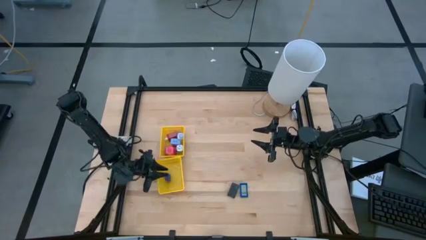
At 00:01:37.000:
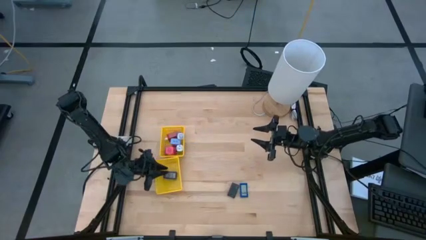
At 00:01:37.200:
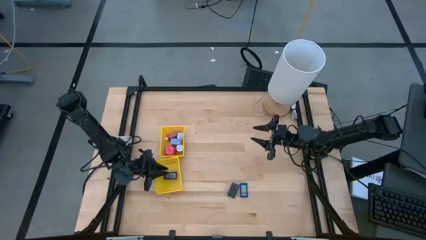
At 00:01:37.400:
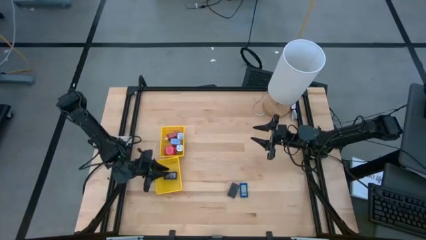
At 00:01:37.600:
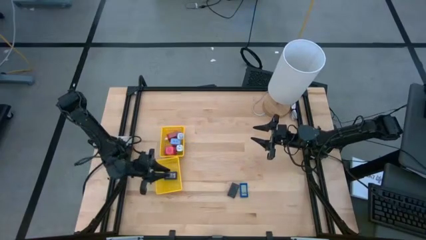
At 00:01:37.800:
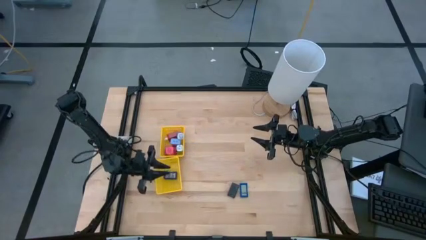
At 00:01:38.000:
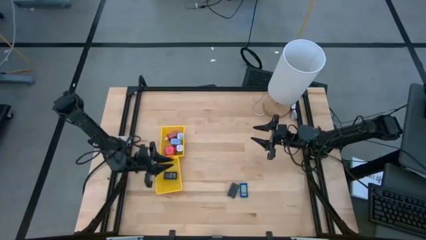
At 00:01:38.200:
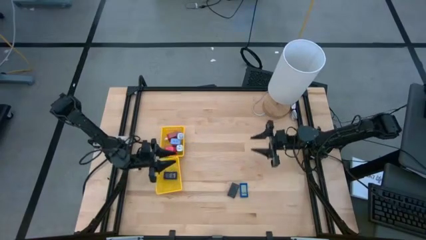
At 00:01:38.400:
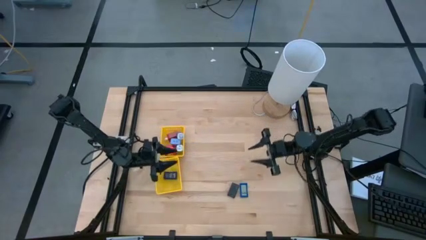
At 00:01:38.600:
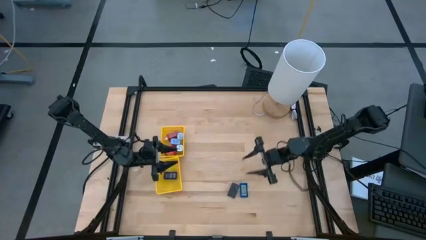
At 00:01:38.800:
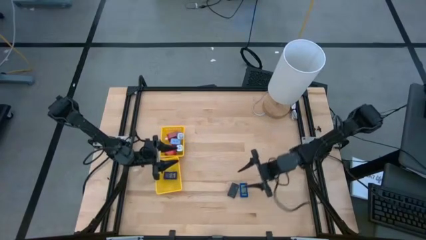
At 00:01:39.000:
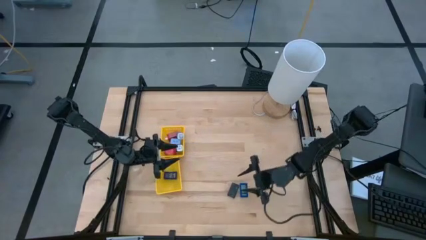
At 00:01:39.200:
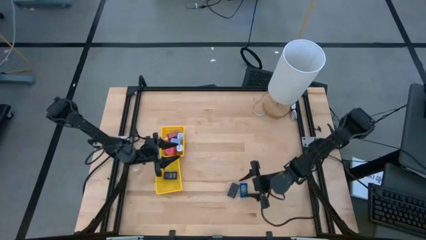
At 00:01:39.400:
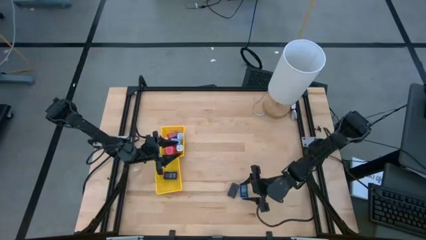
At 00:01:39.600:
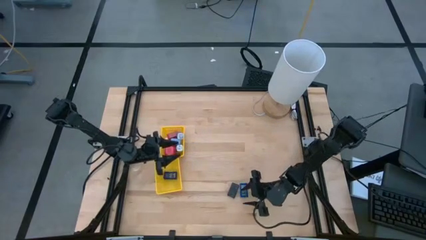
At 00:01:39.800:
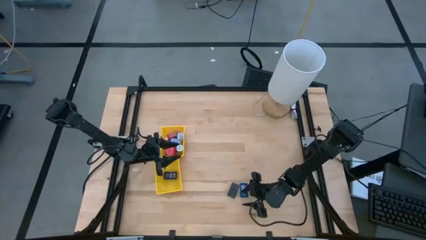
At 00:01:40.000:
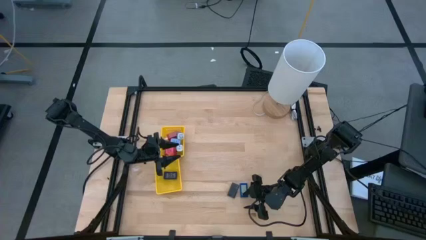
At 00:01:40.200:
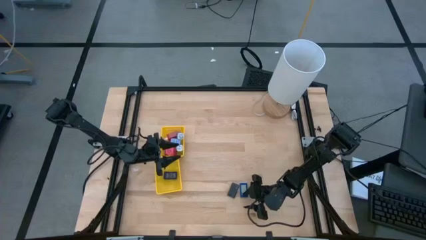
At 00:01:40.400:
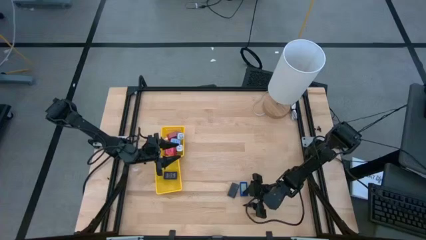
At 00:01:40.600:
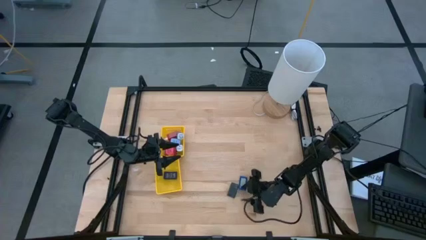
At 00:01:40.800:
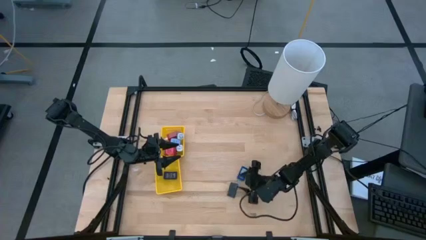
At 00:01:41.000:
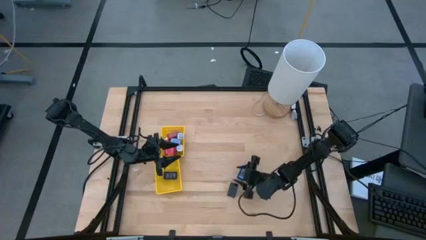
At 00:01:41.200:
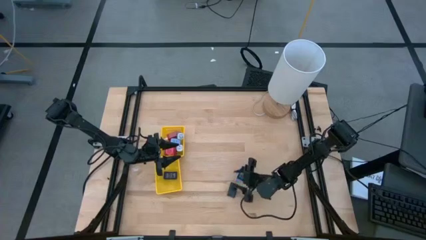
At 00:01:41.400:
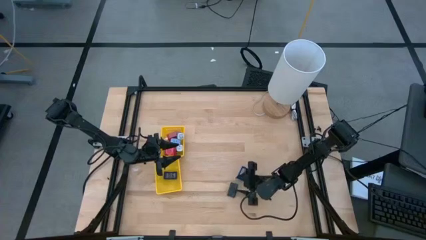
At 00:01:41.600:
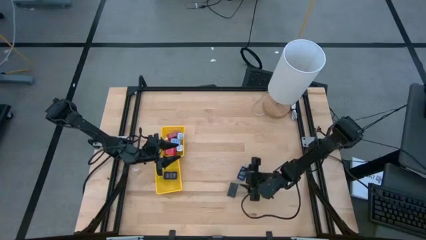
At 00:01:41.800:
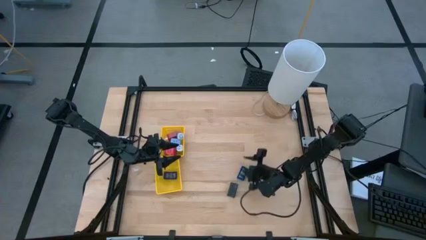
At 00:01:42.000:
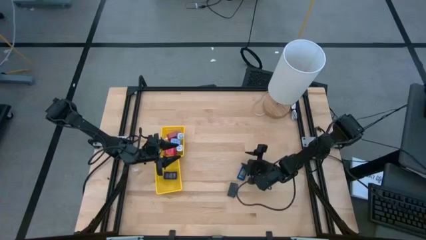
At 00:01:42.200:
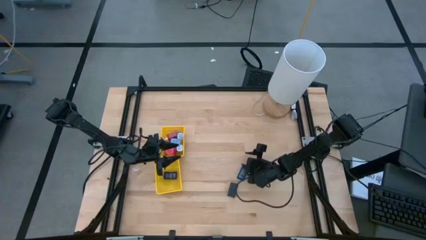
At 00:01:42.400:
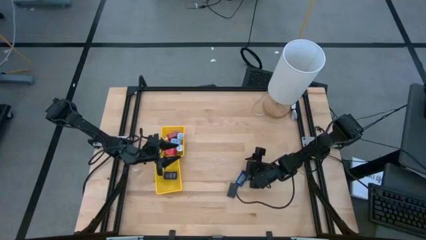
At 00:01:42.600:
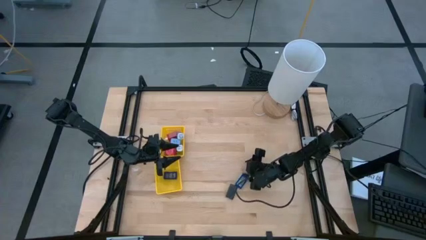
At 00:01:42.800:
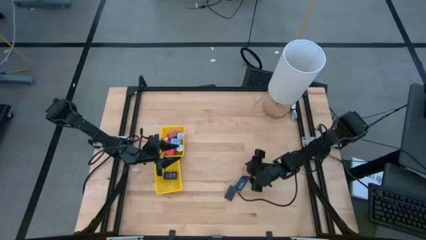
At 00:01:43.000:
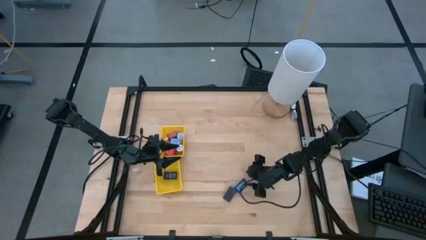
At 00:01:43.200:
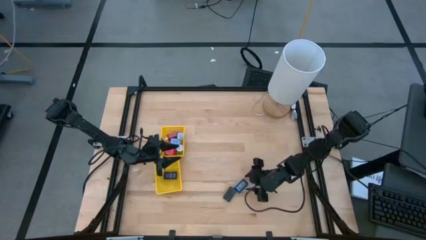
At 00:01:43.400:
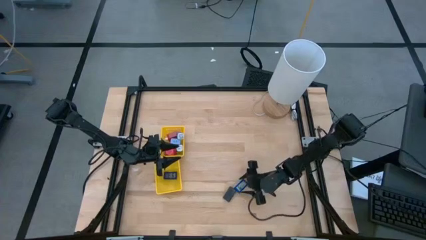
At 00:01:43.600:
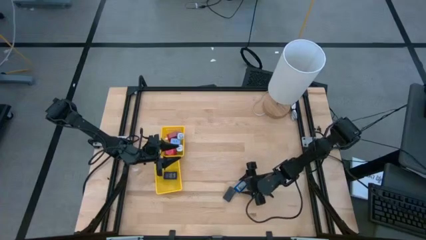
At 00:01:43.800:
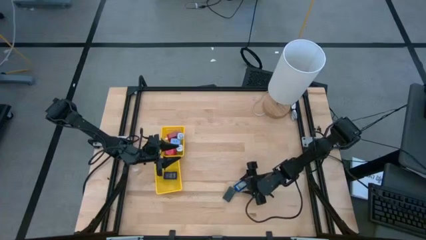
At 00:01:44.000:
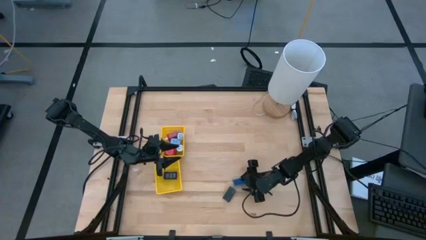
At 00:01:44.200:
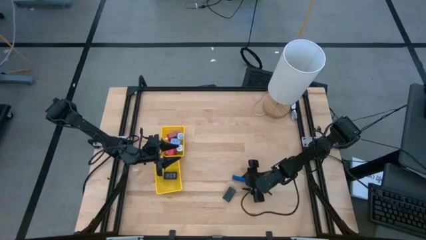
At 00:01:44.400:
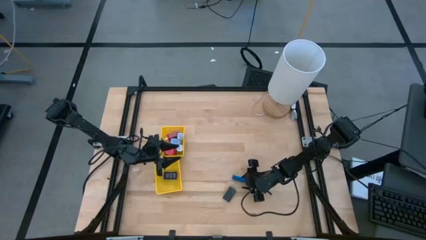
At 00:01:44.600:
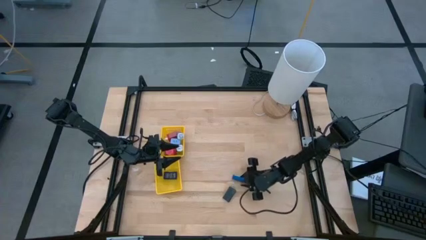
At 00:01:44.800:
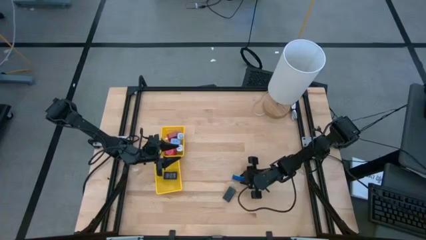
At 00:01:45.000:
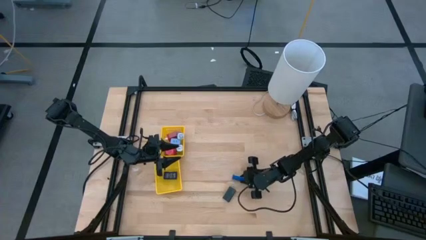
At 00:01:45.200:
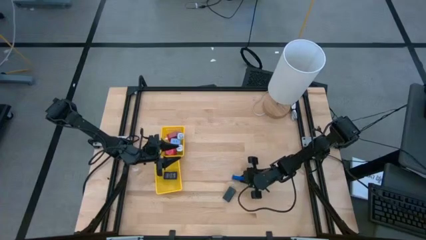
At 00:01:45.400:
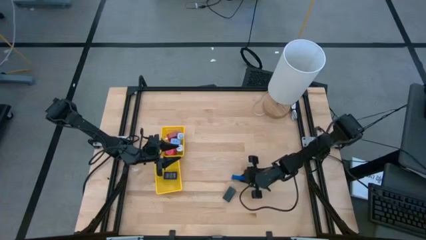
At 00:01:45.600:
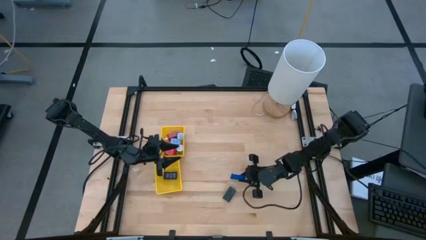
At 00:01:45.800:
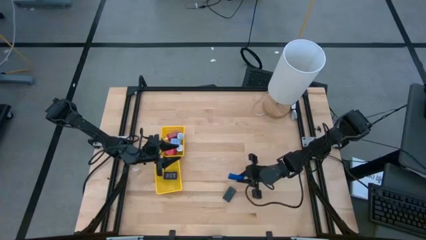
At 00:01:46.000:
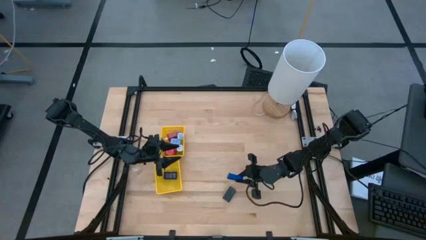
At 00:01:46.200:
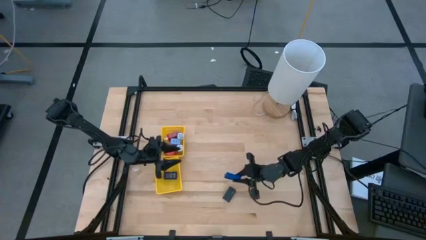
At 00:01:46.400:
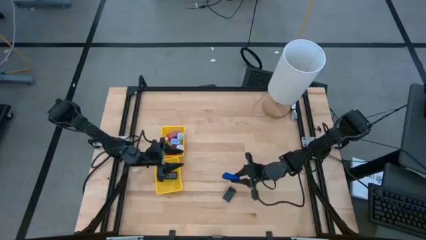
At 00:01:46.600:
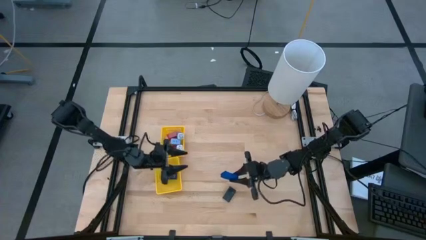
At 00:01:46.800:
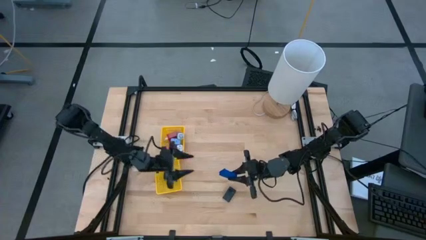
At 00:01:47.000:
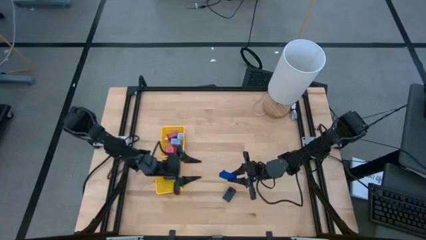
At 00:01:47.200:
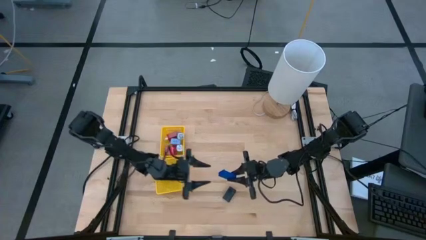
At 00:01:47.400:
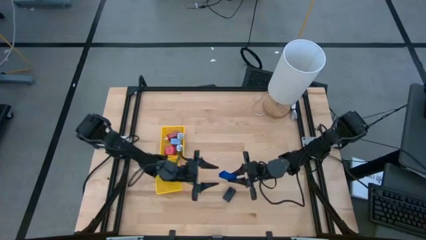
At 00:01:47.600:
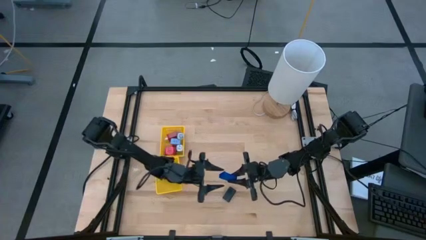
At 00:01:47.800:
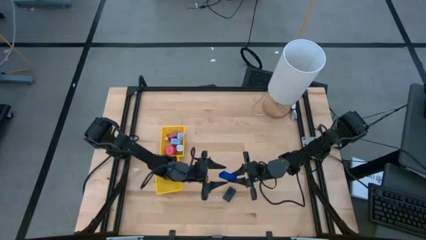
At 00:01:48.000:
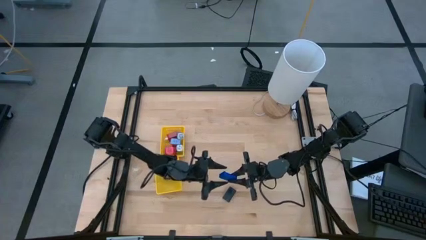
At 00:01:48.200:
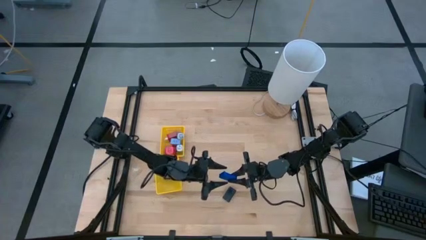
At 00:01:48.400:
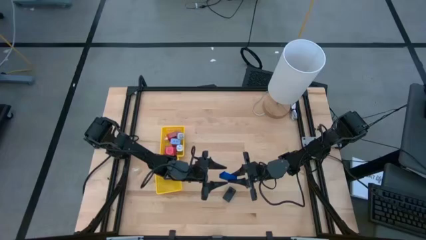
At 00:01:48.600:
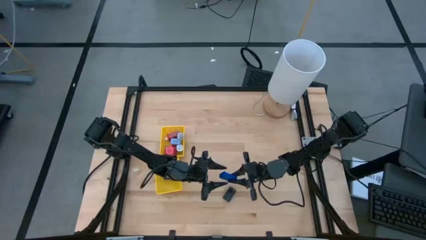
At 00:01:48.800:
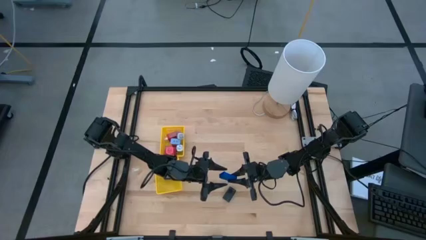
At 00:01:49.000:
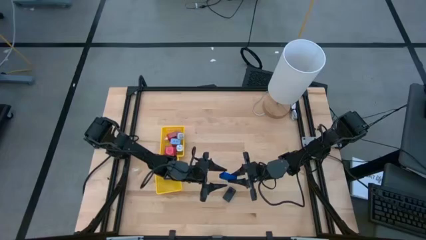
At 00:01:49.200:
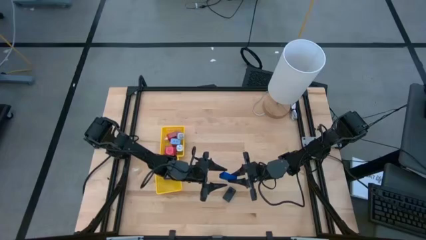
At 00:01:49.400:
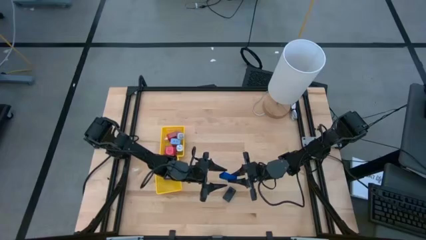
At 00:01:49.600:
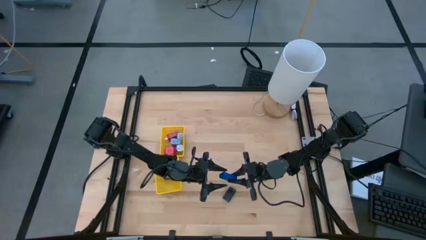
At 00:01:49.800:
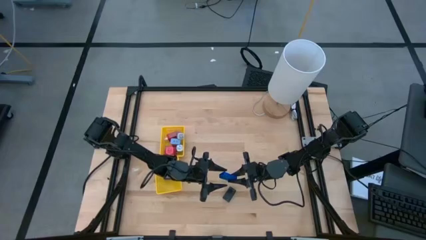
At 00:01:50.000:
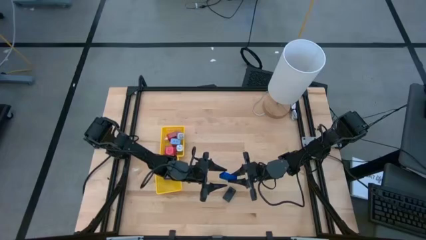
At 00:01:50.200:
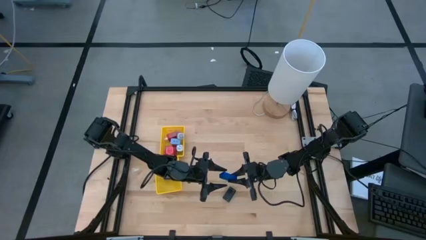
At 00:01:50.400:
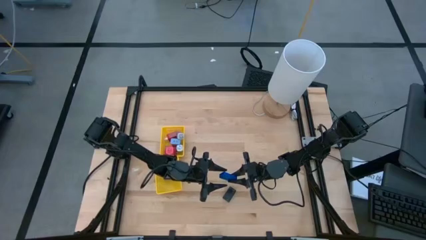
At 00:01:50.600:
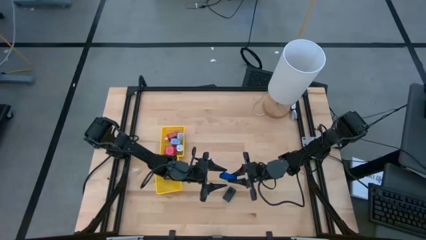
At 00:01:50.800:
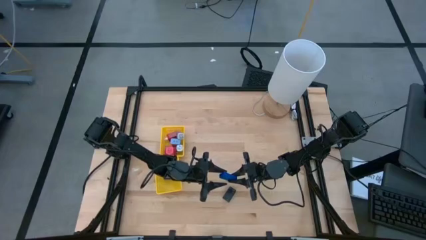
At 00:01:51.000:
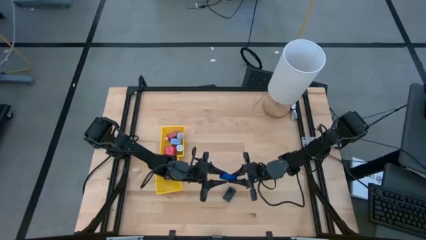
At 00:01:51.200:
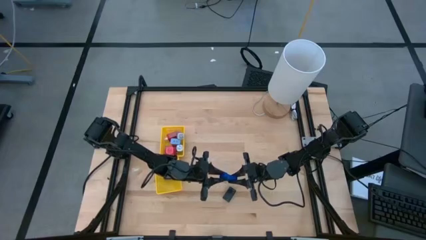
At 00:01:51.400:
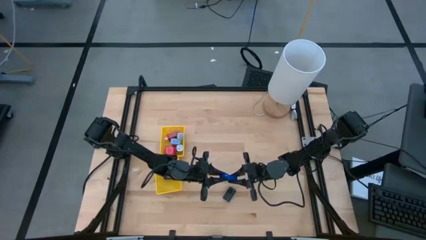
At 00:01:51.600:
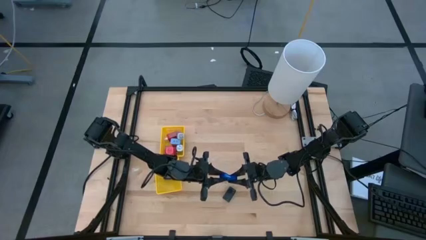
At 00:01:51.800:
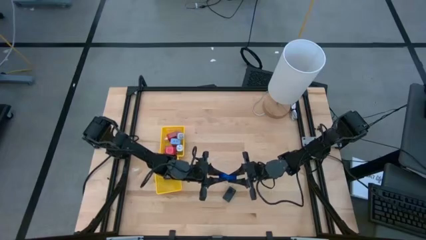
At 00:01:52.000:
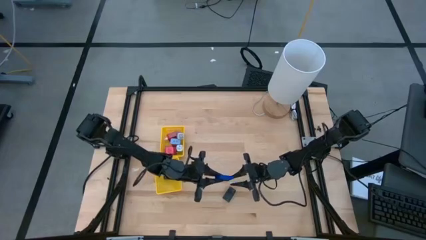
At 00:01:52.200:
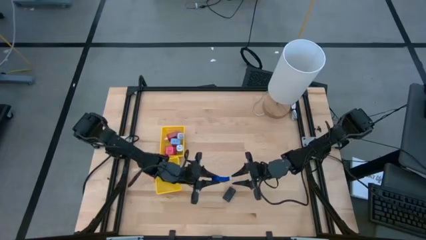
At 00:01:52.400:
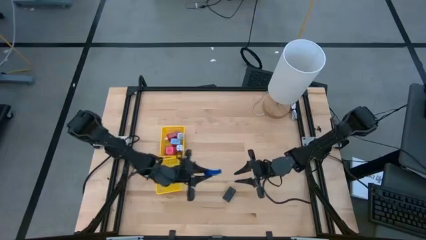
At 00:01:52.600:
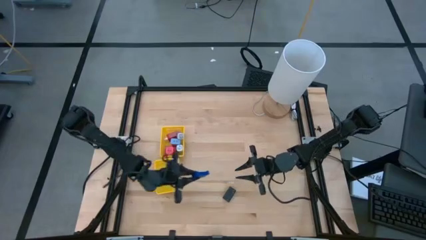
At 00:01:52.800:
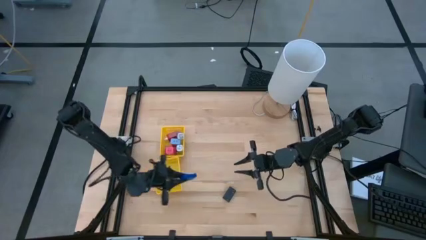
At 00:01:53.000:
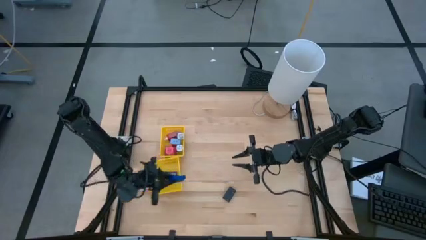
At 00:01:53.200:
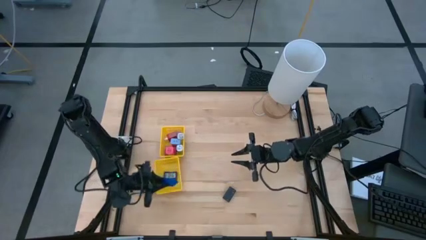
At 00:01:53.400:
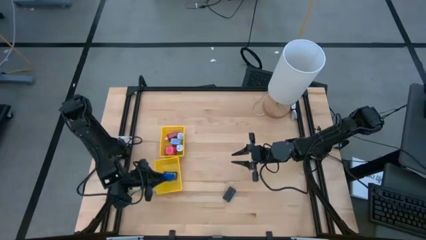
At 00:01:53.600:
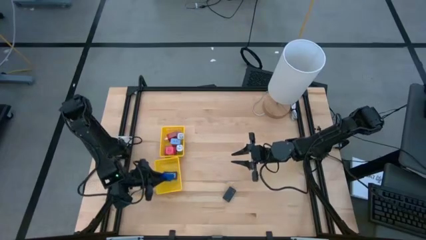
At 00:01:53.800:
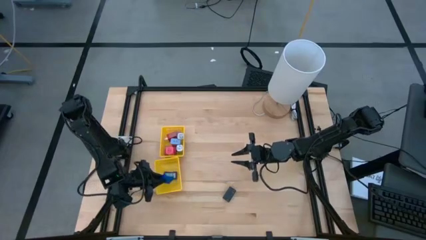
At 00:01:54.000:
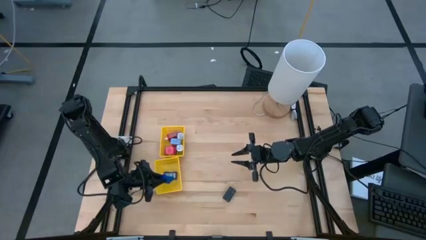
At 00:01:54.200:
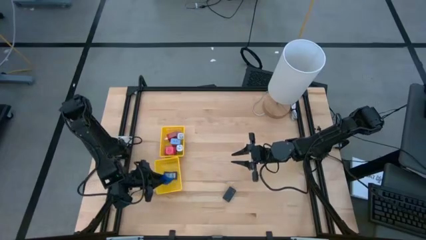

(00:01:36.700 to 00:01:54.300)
Task: Pick & Place Office items
Put the blue digital timer into the bottom yellow bin
